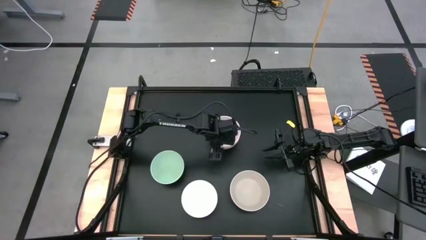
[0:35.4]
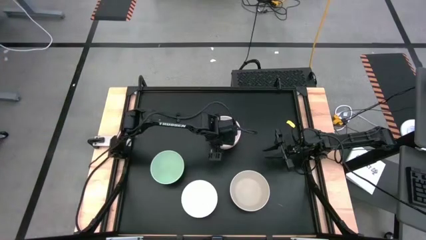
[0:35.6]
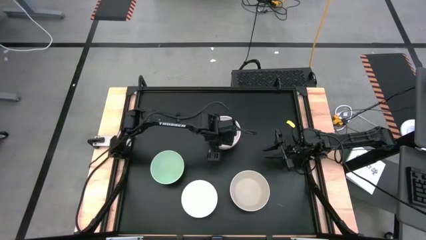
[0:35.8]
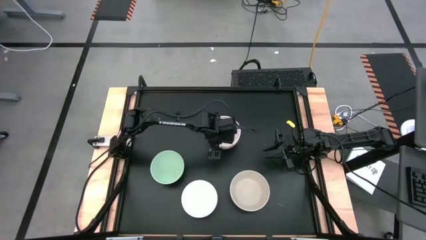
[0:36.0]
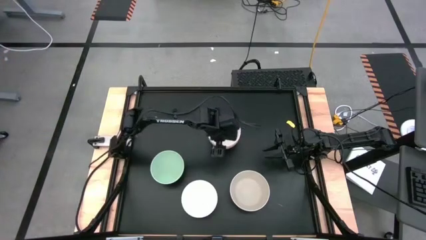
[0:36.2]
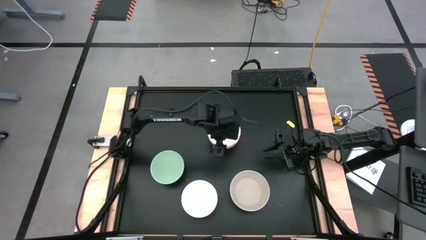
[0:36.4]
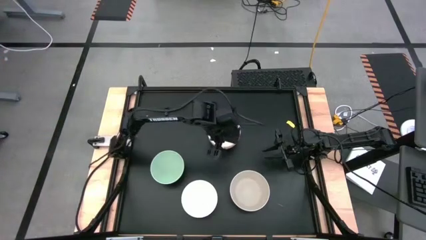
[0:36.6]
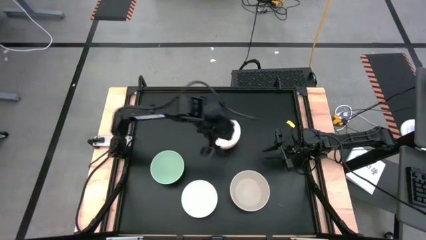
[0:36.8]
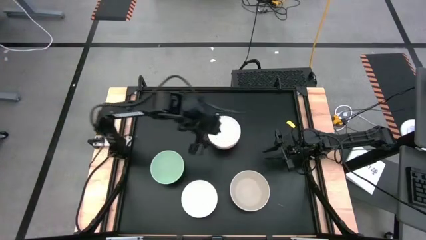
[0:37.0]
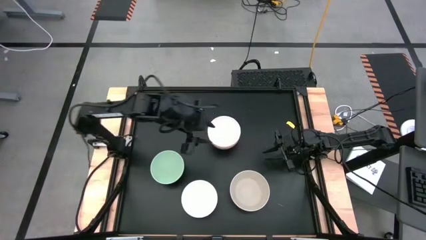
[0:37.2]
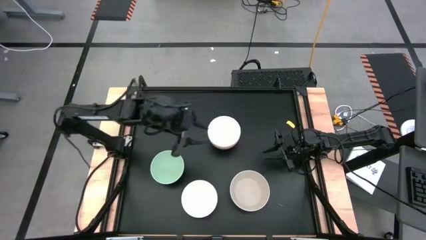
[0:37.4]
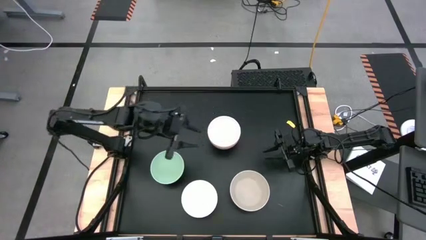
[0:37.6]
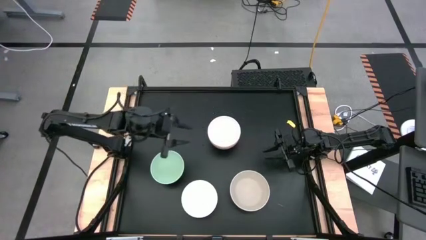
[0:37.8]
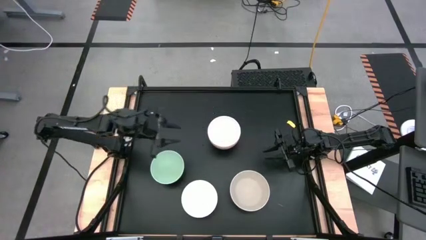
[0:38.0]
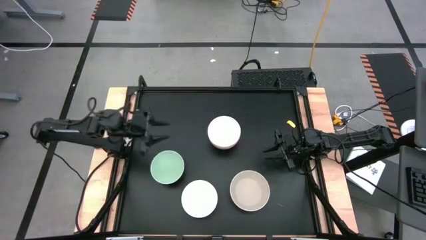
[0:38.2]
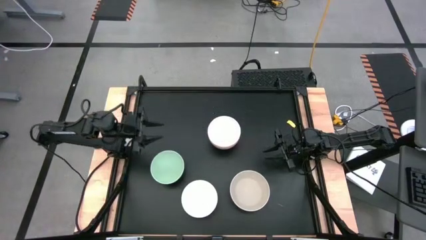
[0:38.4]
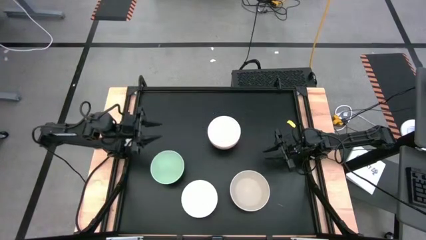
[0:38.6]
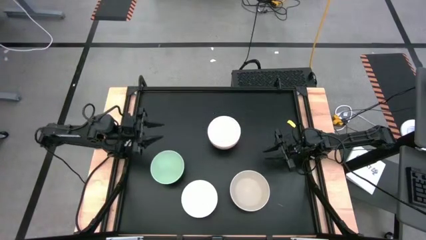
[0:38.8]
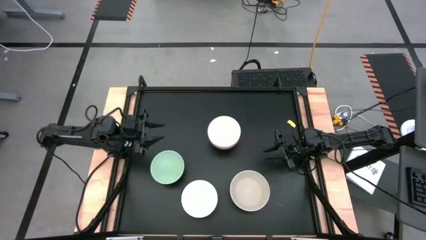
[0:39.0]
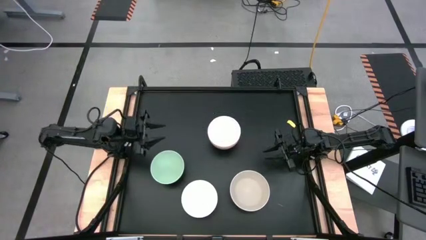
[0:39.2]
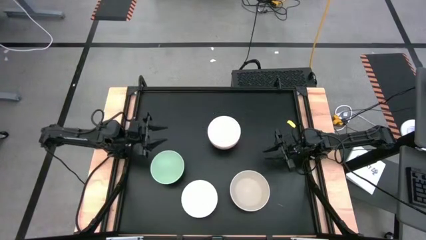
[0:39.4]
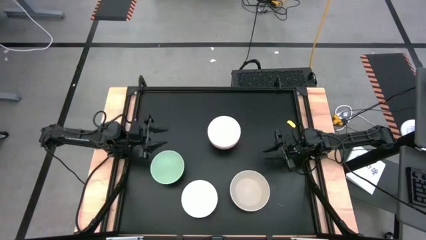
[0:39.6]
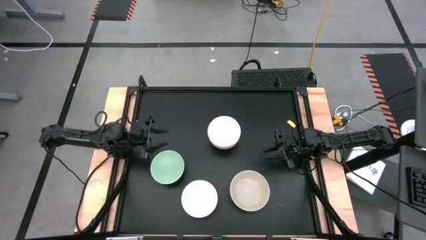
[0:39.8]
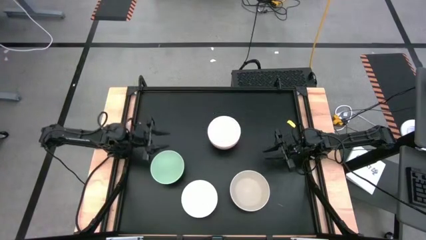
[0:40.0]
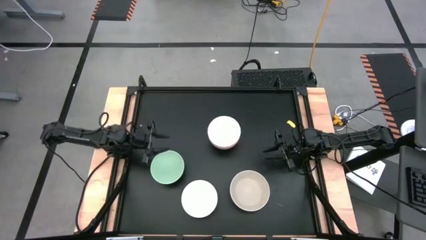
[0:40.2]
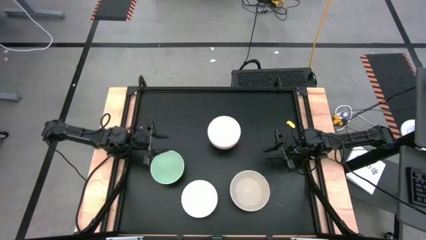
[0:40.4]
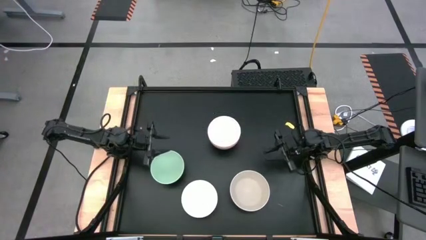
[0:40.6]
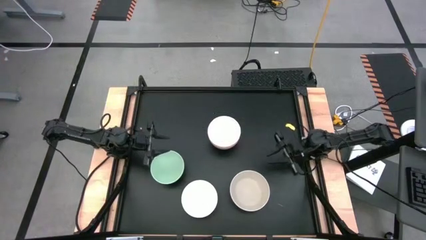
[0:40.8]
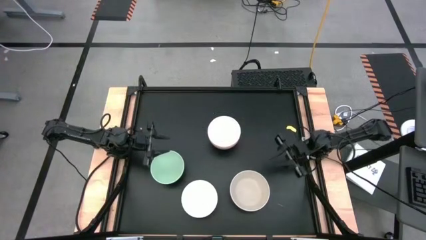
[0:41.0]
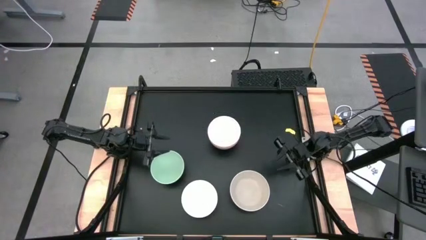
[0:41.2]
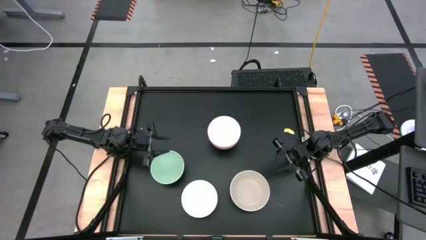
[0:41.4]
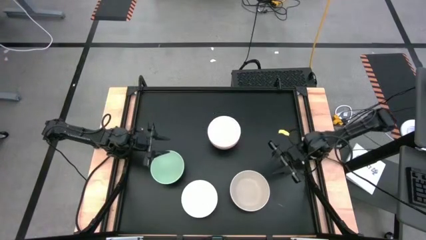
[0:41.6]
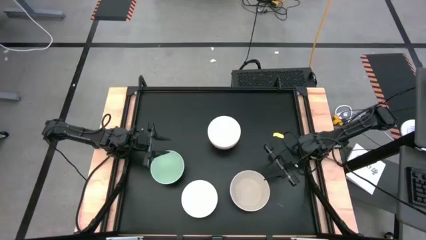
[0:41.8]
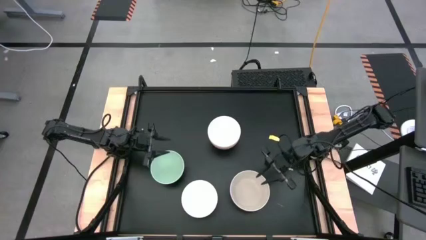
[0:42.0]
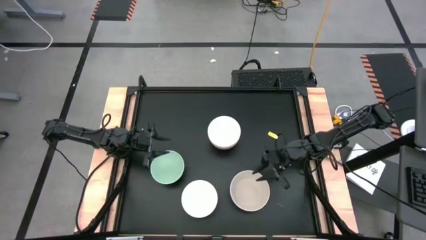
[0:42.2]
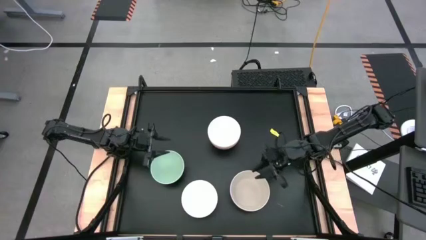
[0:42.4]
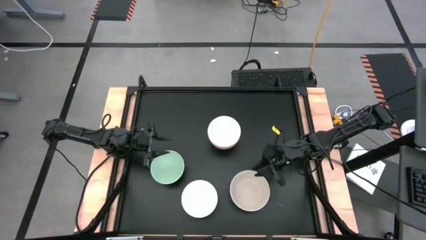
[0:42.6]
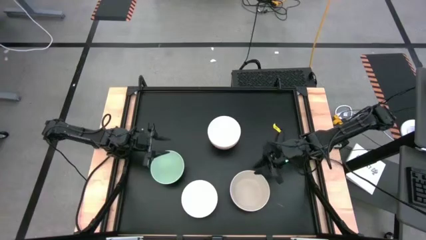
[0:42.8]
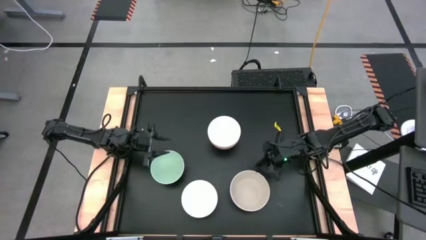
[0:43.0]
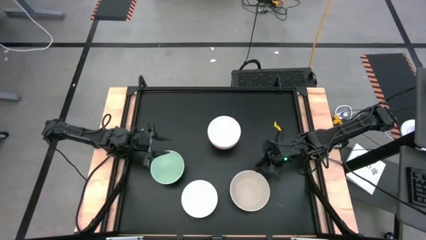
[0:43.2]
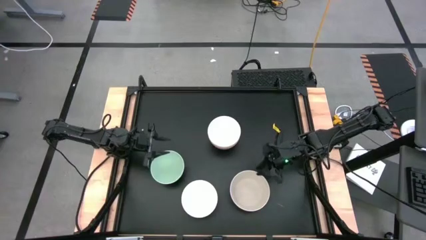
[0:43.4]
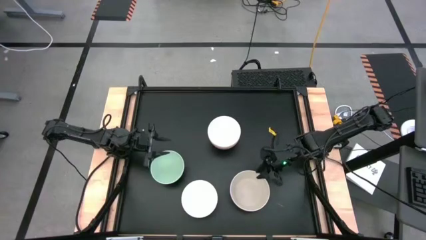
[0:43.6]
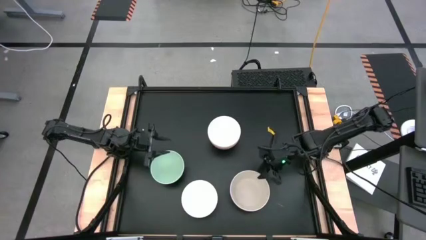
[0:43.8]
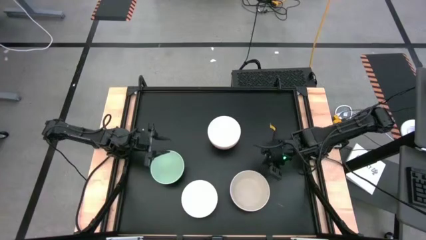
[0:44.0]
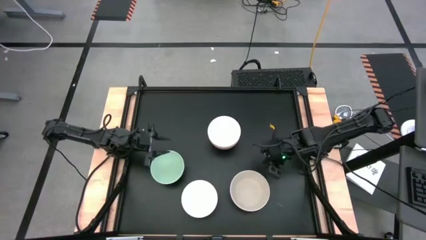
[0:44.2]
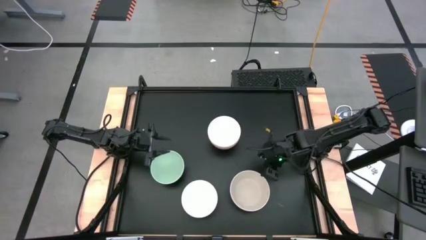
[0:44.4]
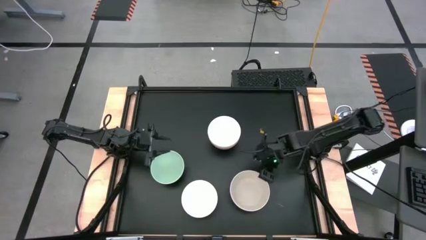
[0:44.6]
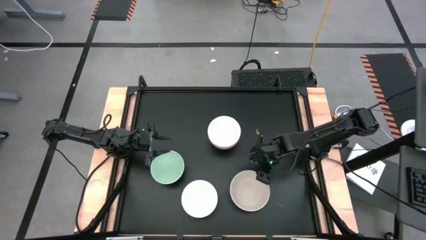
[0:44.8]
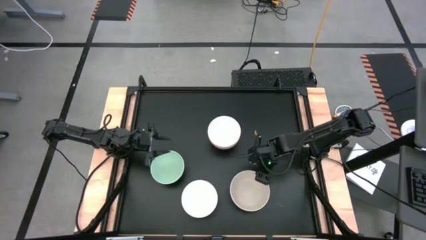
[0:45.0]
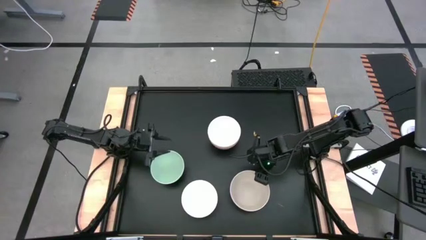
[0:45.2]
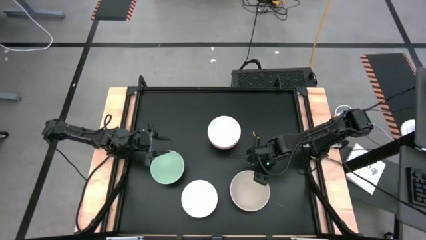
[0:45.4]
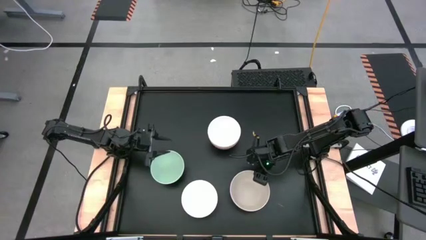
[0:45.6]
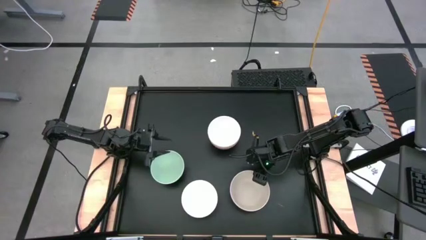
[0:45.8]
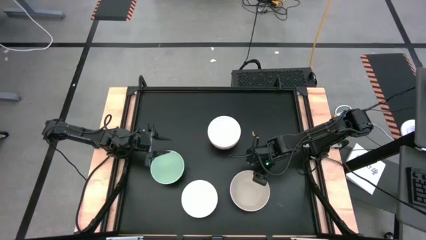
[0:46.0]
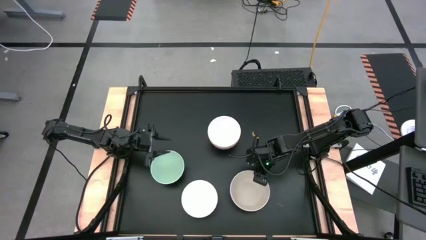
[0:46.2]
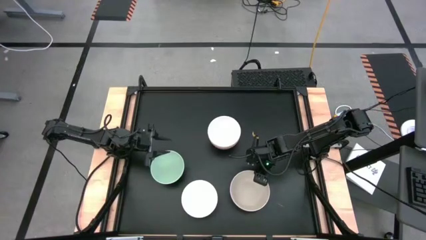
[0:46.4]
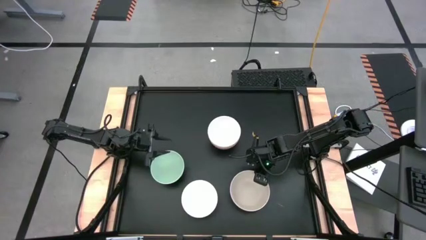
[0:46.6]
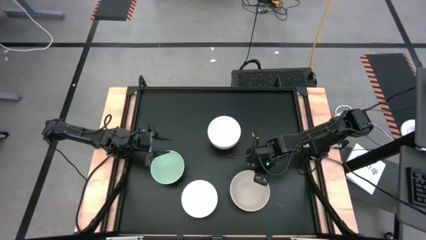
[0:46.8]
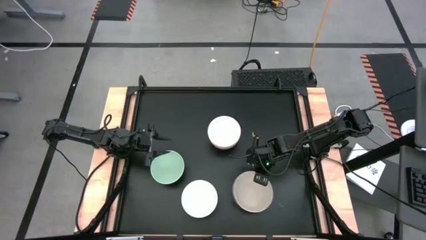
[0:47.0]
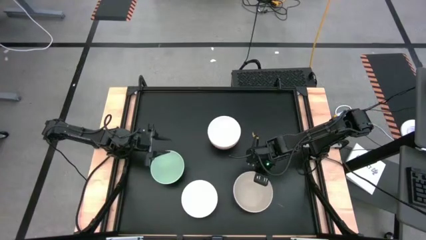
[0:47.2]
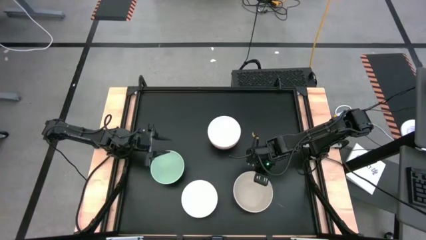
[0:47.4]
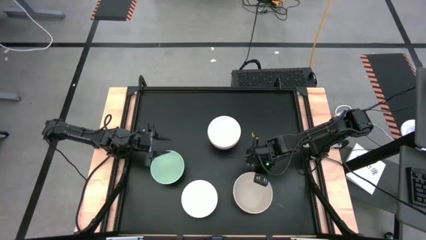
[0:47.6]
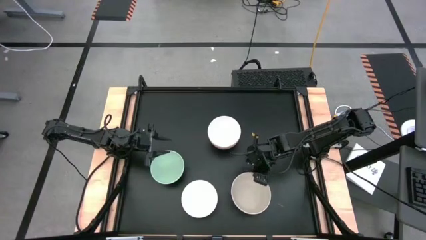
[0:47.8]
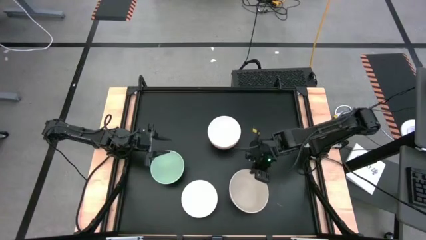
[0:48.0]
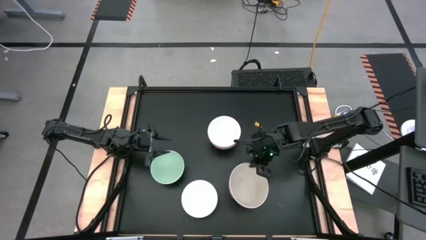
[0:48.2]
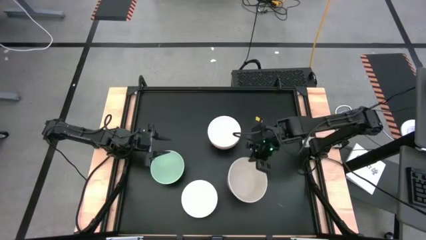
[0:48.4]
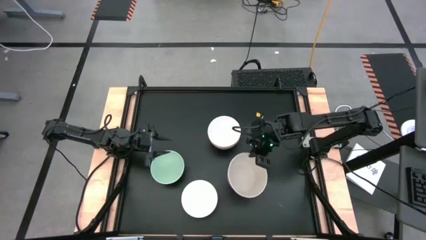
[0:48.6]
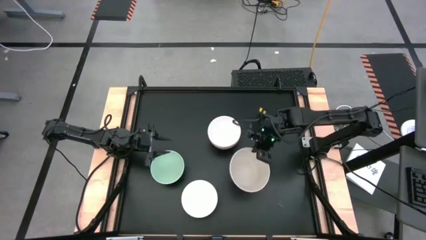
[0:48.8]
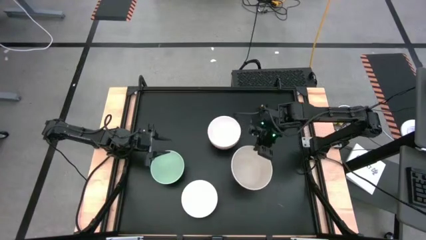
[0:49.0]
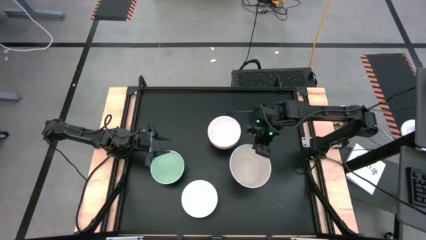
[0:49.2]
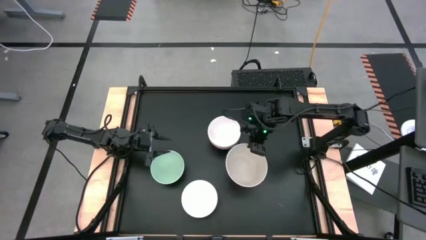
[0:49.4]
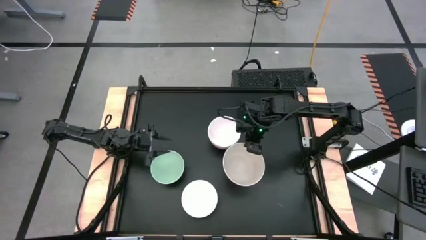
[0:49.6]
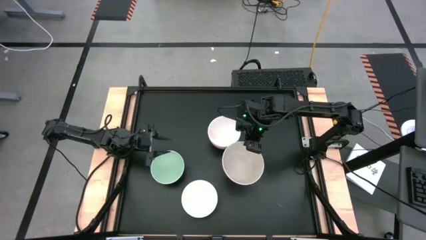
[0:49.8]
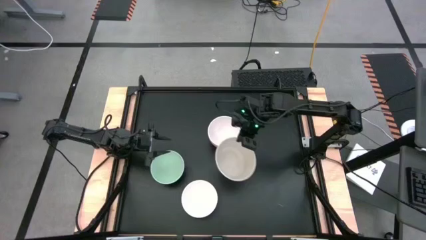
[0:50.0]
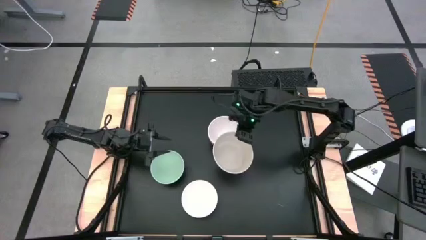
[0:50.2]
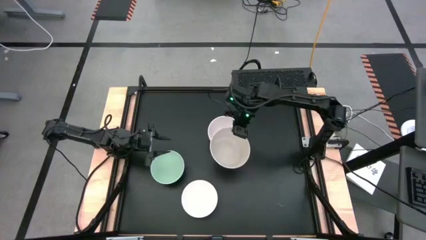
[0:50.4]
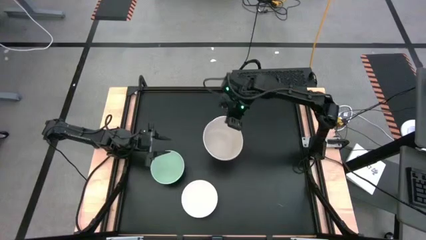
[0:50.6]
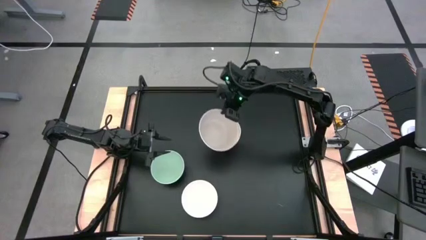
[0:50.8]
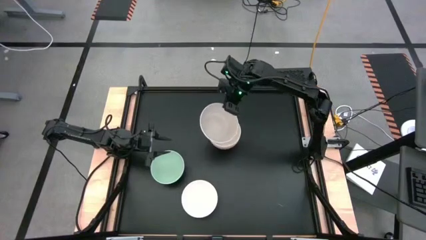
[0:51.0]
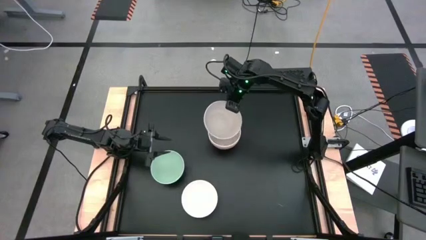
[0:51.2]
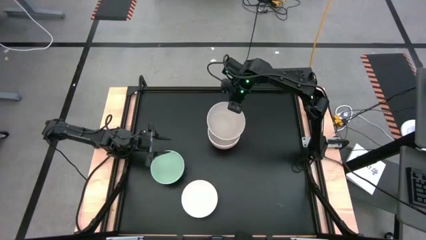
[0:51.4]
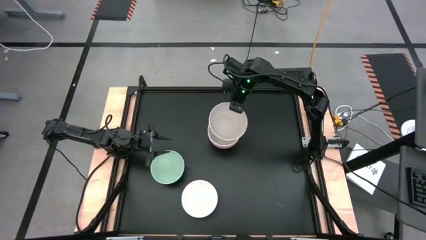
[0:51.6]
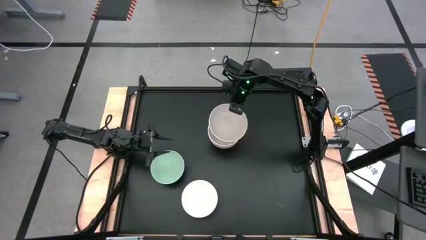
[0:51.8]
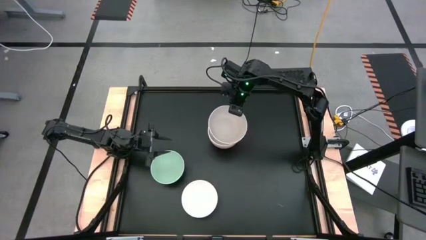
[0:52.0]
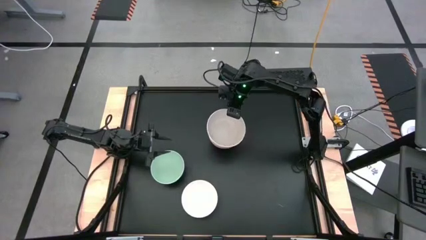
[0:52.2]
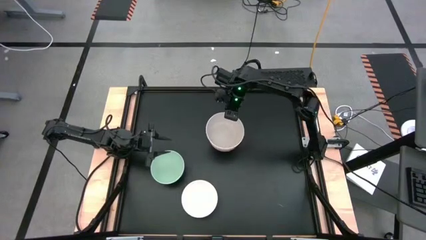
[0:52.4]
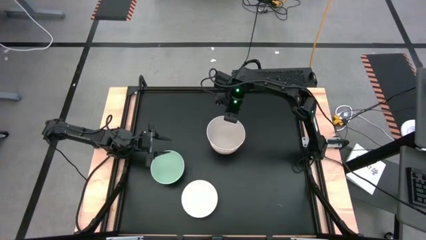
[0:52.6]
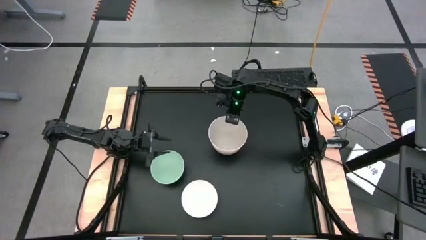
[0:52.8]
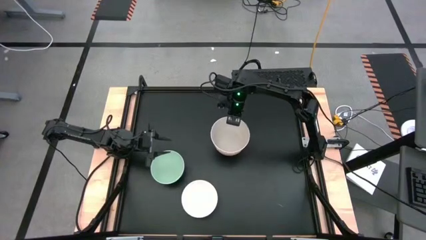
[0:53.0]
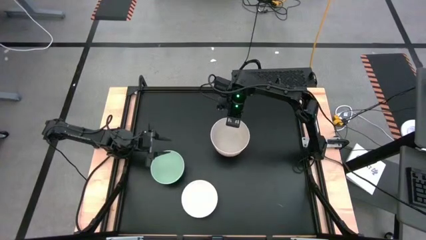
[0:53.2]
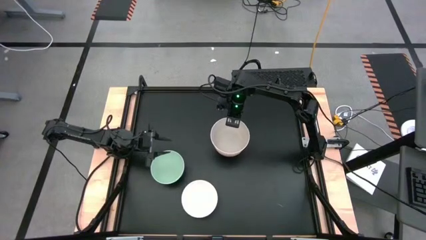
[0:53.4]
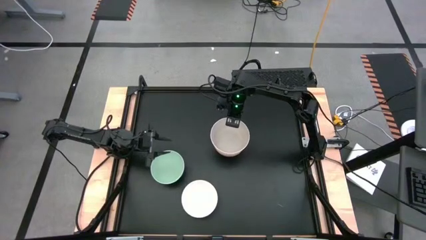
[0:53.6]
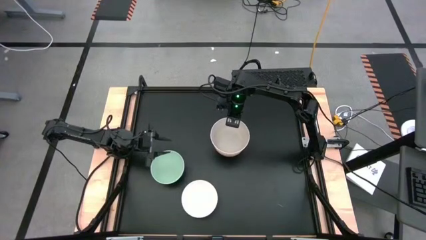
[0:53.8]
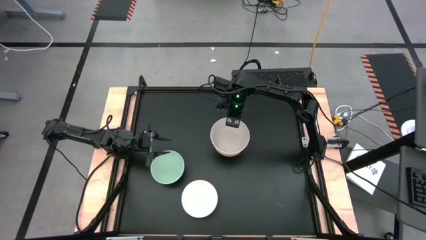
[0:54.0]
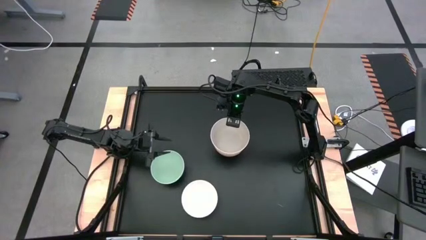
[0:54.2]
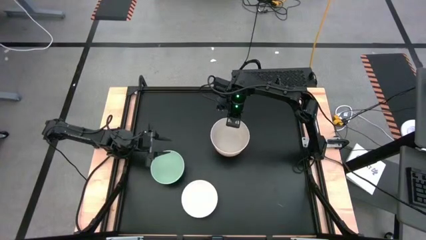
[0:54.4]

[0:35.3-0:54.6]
Task: Nest bowls inside each other
Stack the dark white bowl on top of the center white bowl
